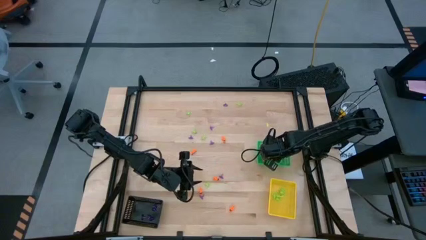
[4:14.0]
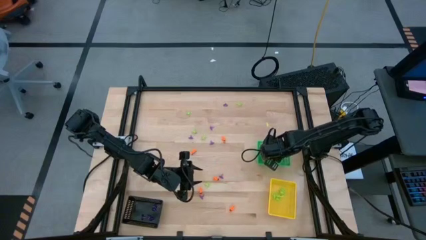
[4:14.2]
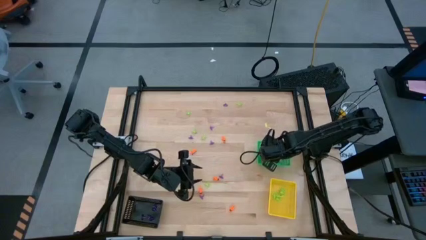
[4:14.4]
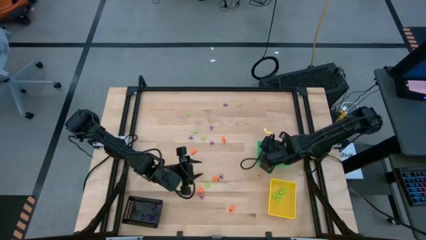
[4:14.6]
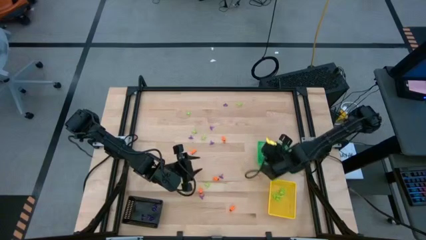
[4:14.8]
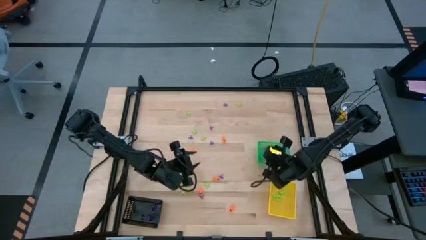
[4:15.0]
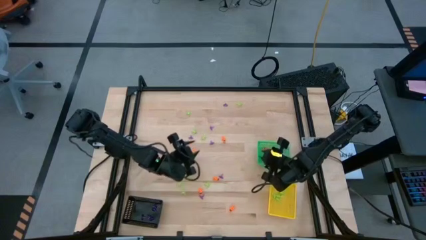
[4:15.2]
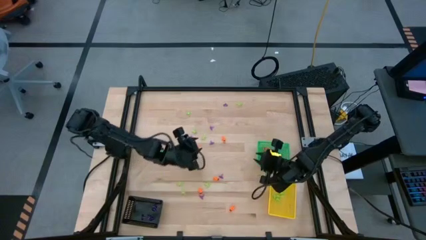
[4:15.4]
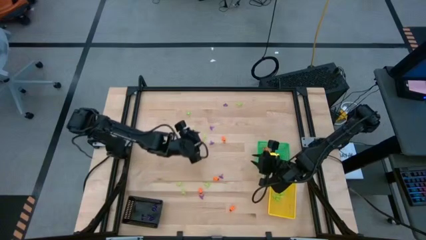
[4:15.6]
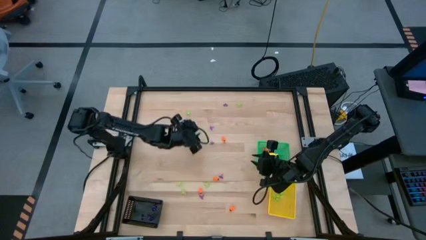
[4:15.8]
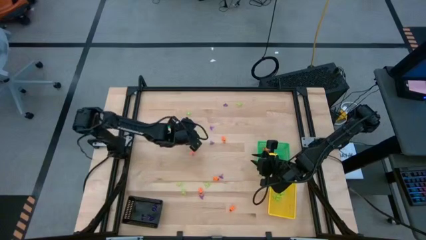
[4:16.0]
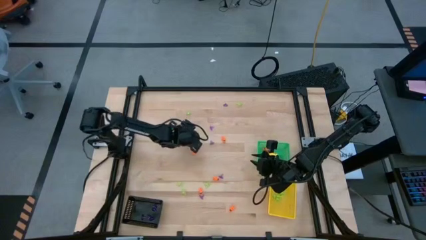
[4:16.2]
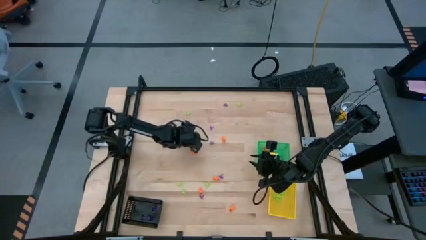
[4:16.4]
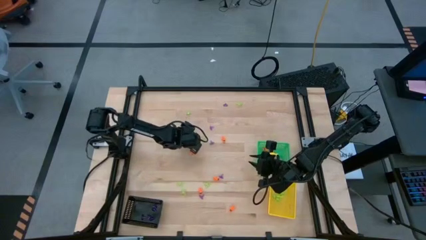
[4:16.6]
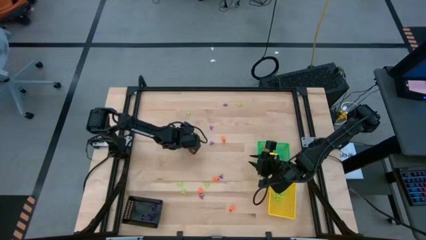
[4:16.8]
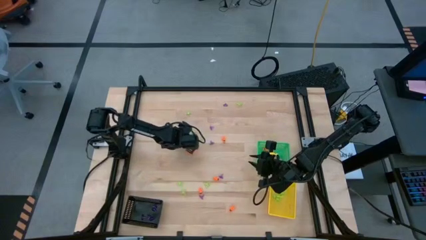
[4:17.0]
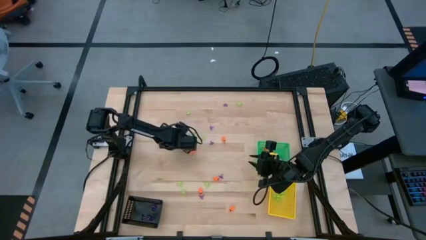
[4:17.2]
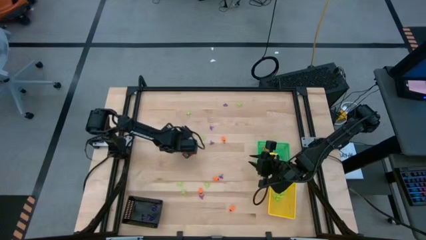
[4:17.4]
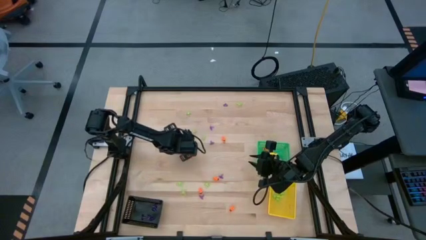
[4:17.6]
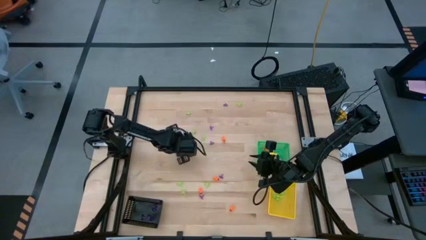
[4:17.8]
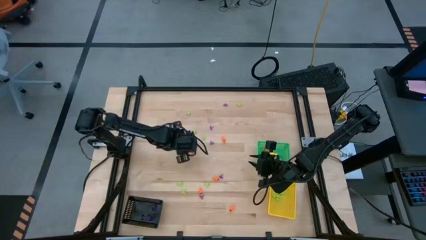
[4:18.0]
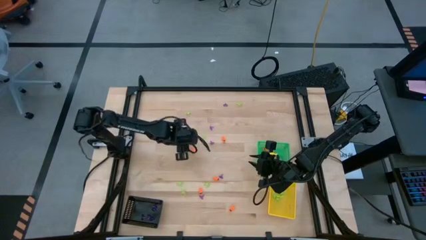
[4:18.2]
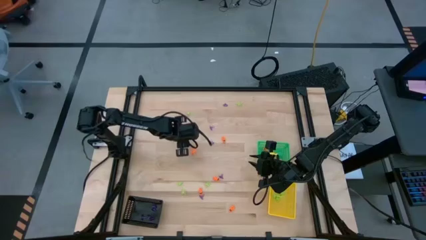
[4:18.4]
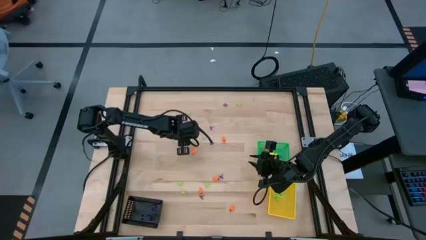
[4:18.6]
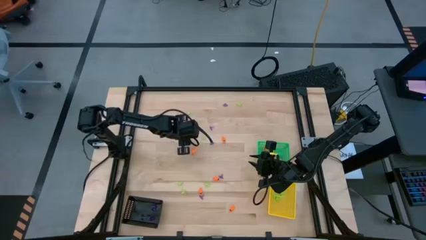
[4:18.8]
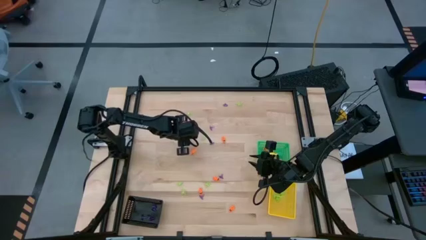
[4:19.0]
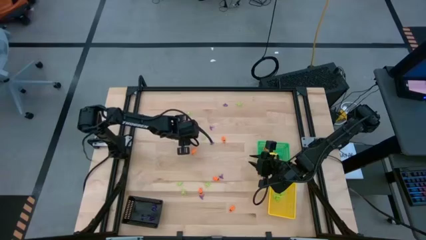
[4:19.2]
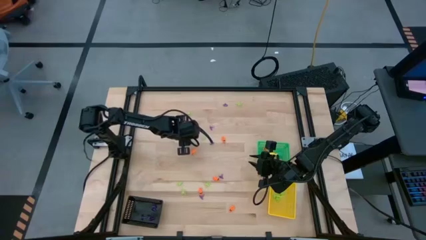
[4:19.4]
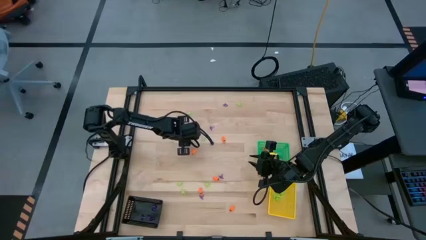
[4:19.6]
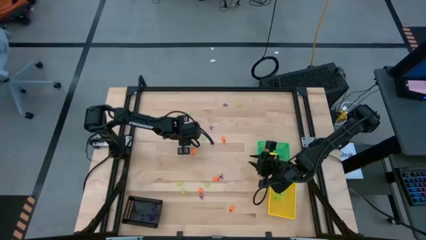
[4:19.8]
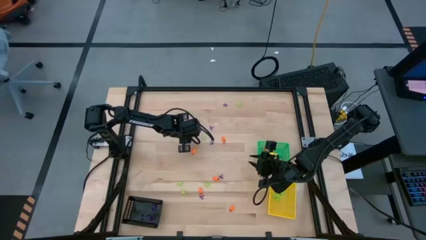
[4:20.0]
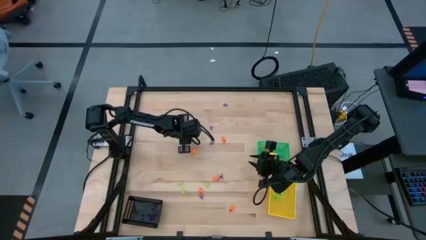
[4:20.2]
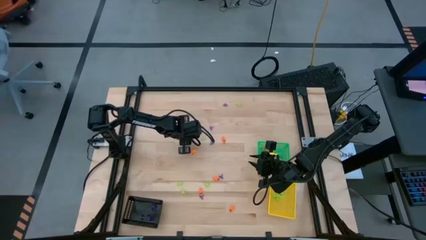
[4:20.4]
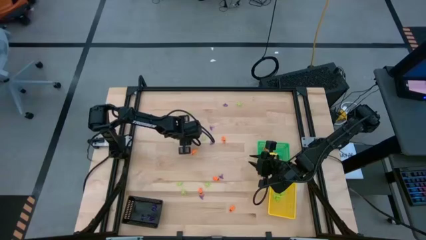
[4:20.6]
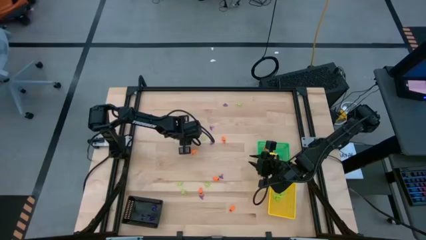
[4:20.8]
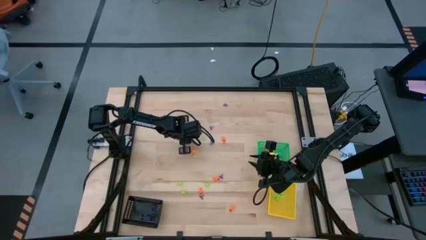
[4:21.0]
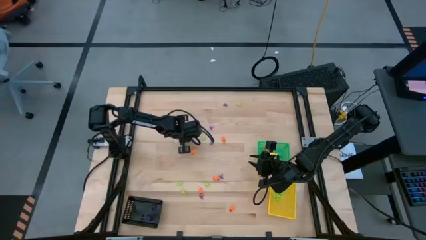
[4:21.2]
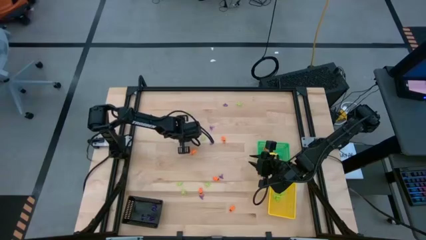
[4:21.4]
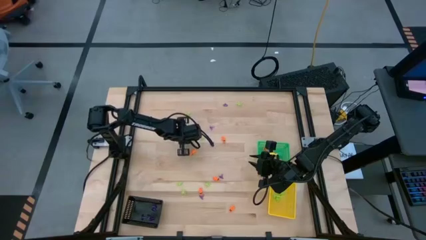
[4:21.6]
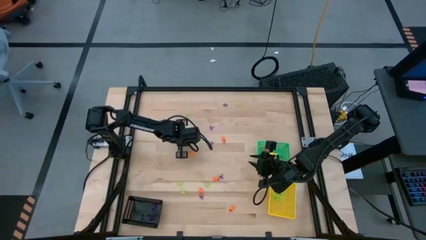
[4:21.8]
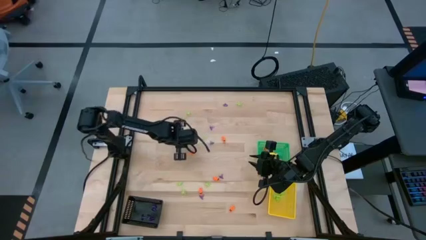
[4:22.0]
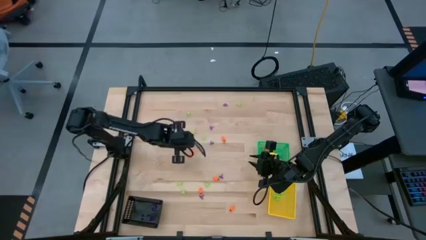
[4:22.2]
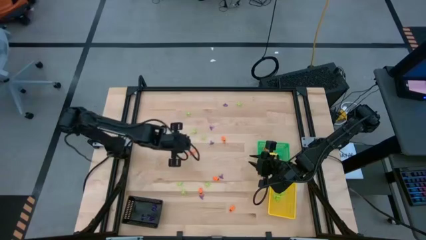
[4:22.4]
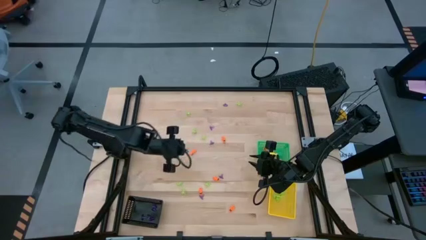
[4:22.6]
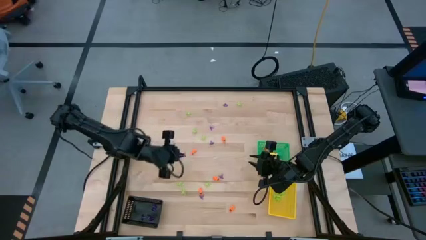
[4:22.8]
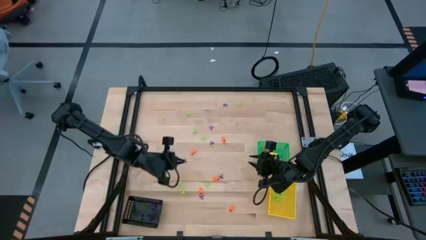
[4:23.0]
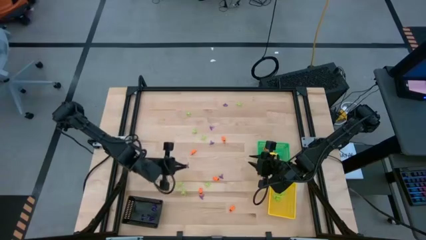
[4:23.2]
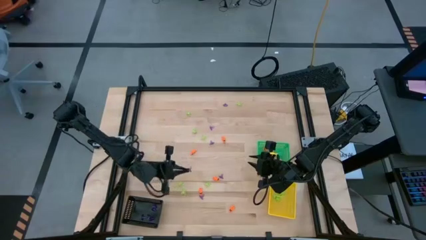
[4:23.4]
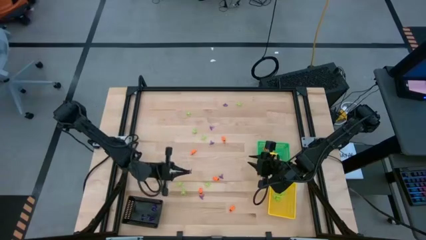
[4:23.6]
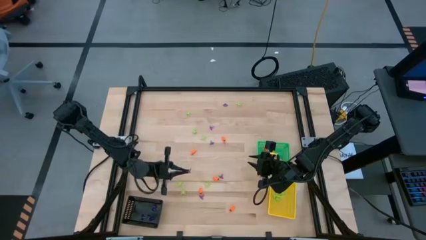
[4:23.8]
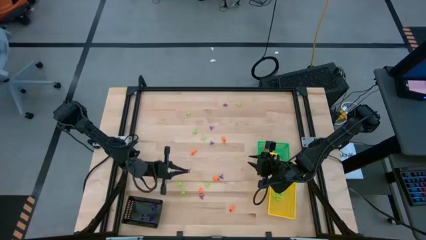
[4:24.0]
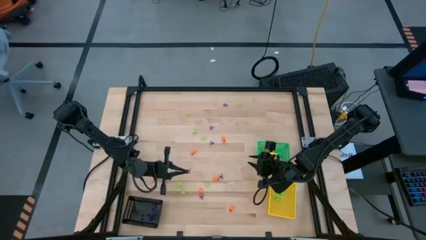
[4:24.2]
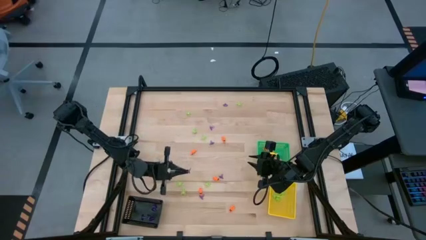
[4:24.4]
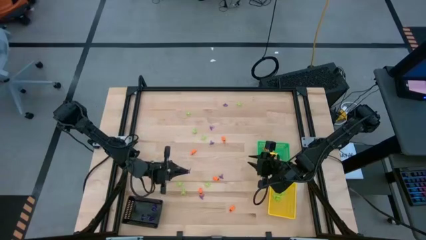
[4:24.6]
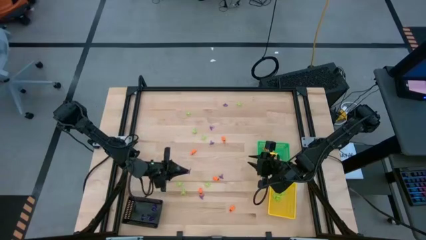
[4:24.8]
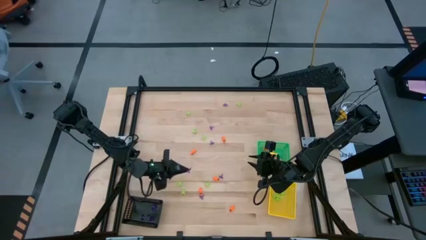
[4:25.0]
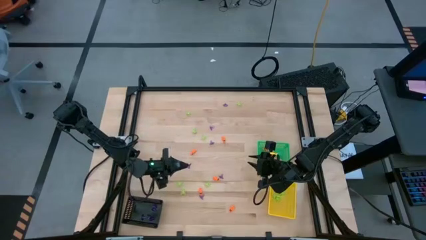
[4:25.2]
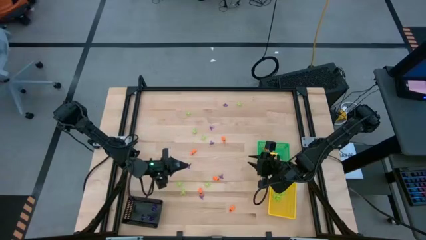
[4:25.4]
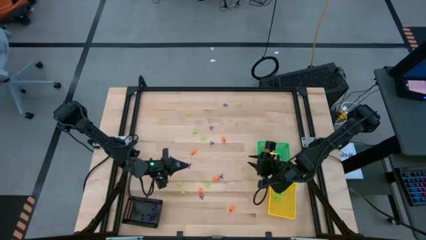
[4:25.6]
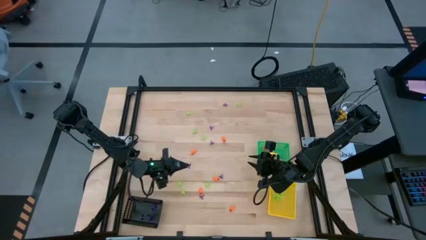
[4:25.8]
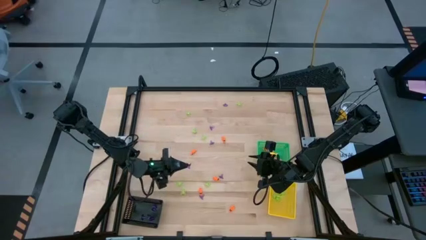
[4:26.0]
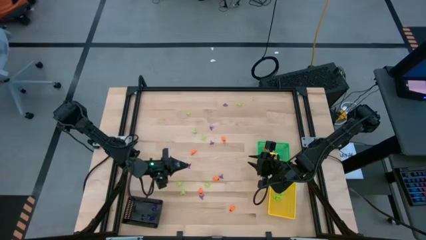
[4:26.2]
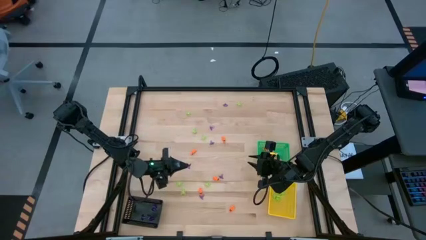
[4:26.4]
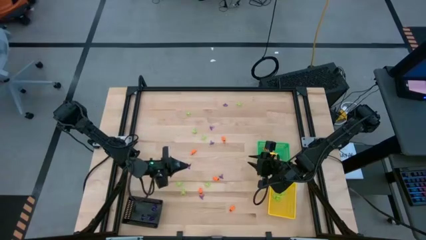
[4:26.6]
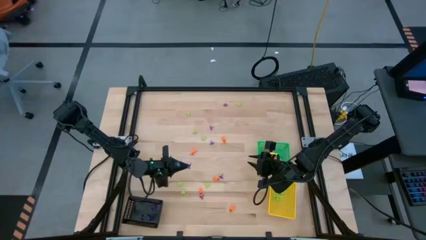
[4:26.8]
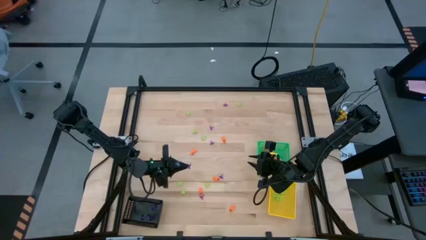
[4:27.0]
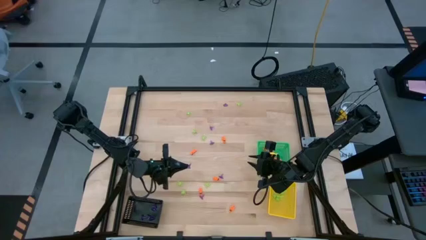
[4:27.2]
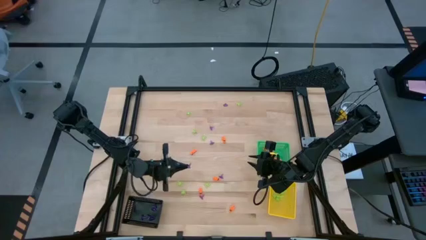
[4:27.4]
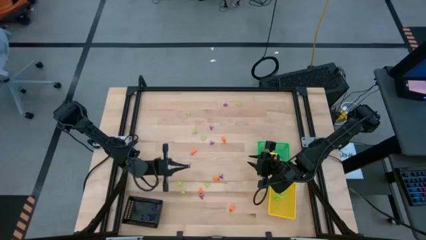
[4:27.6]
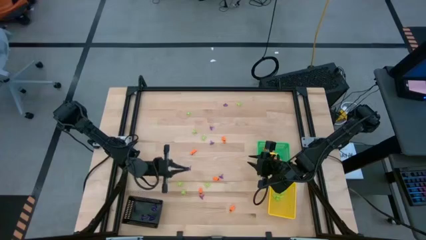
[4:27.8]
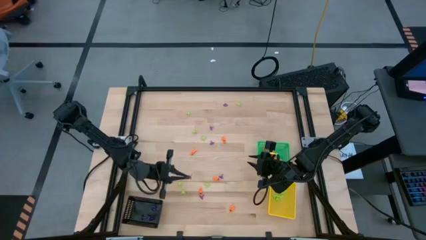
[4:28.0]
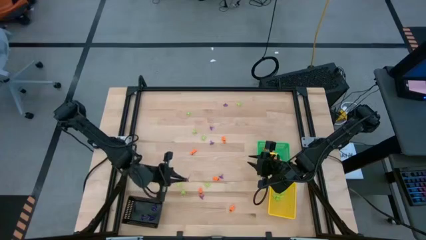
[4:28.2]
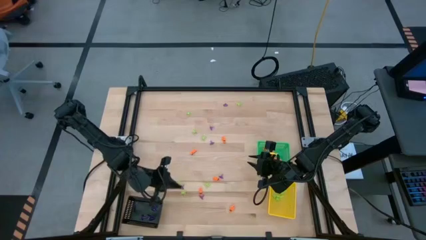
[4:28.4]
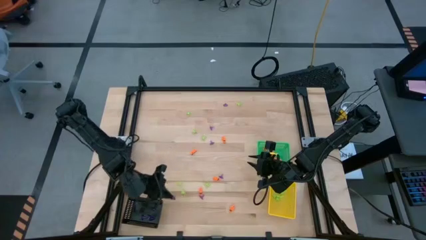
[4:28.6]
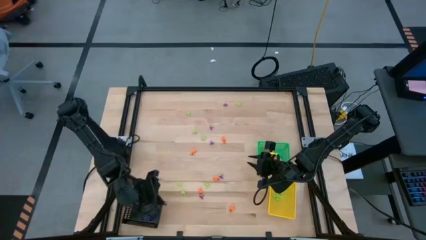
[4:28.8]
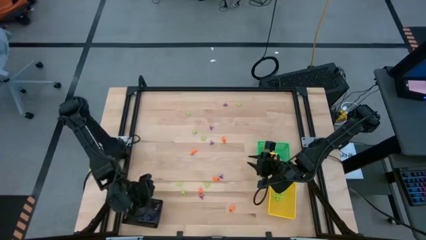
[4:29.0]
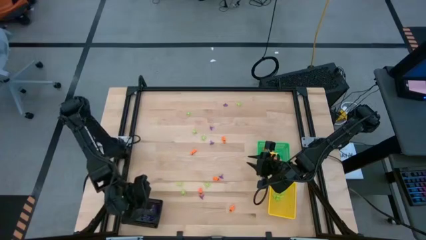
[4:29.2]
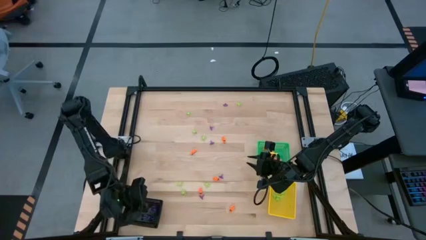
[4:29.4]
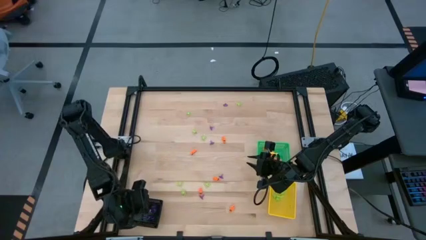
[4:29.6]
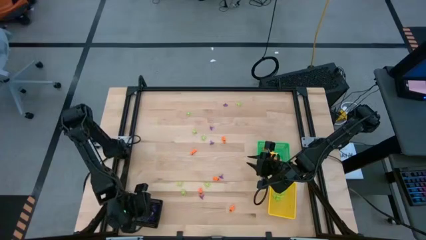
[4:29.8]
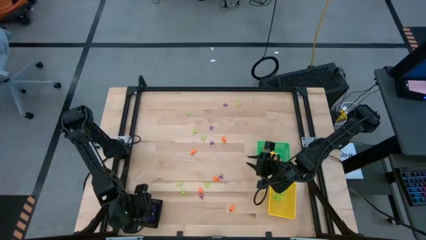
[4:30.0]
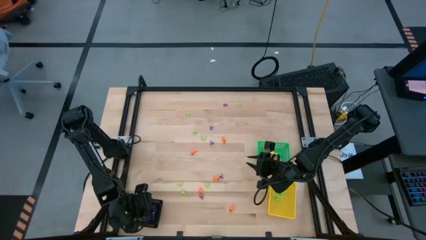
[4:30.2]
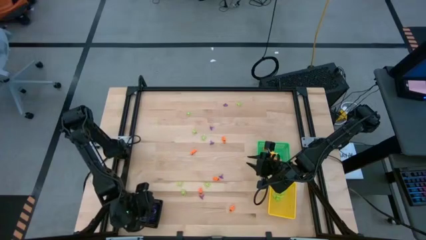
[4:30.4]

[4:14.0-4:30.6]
Task: Sort Halloween decoration
Put the purple witch hat toy into the black bin
